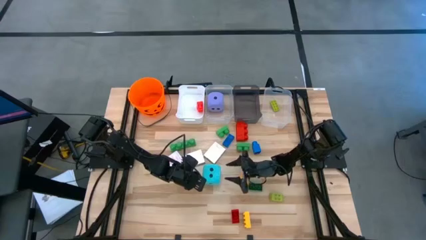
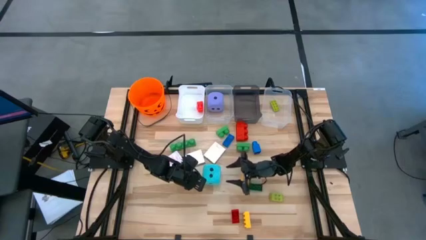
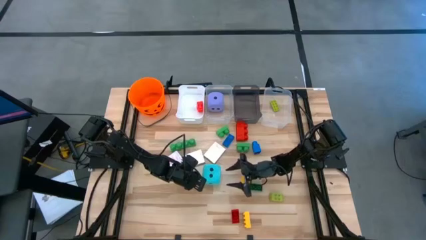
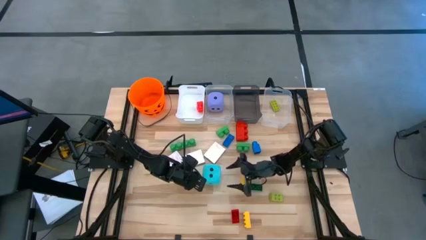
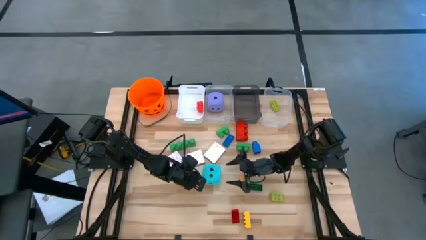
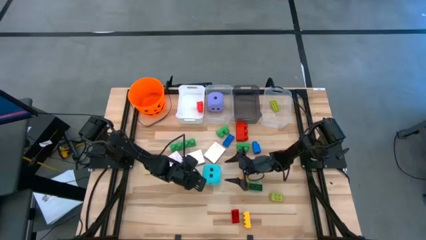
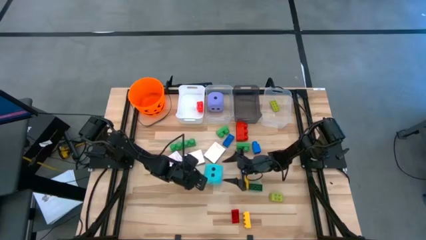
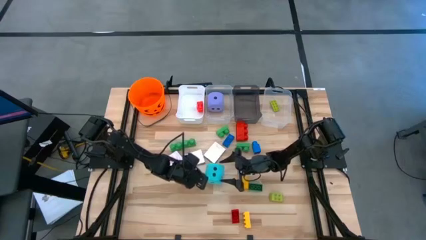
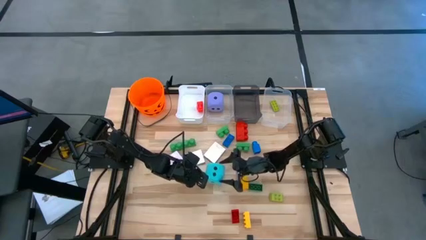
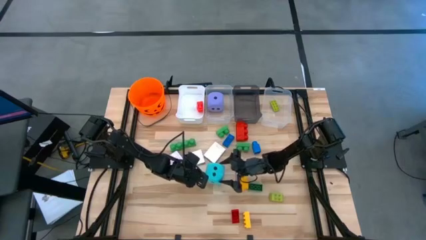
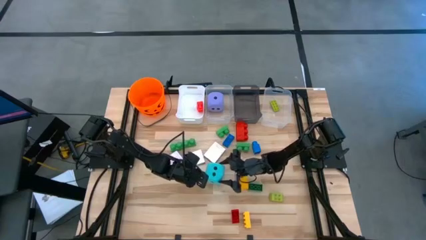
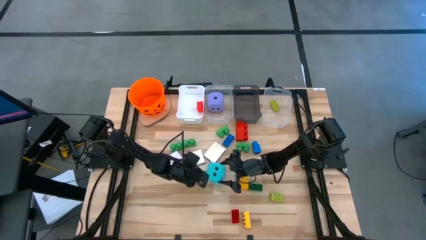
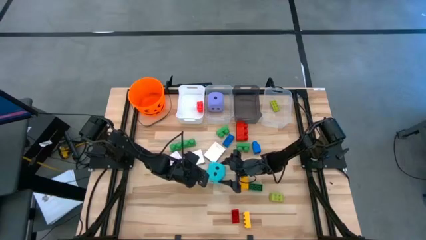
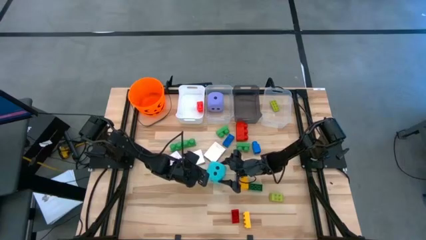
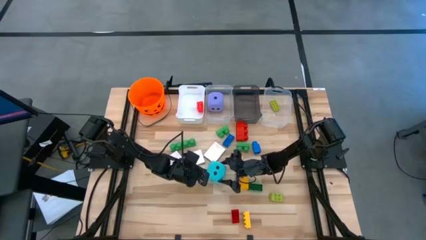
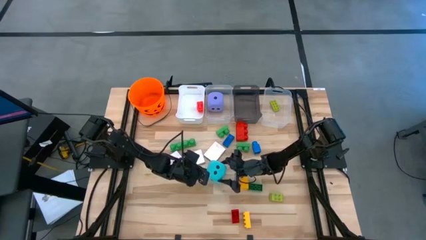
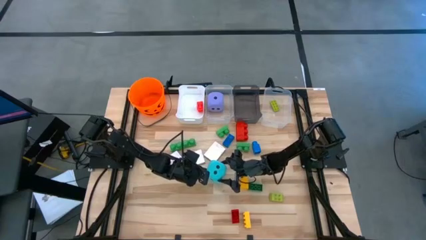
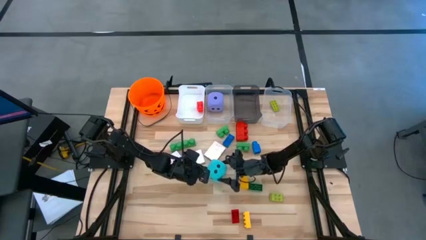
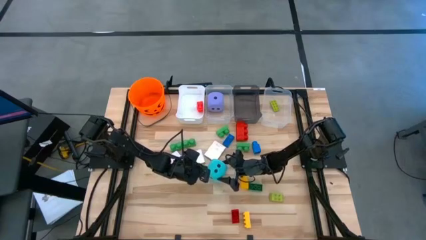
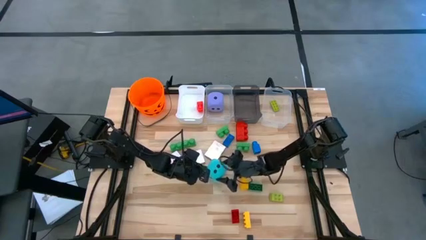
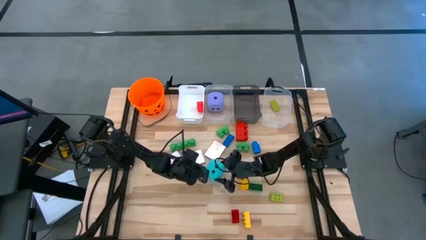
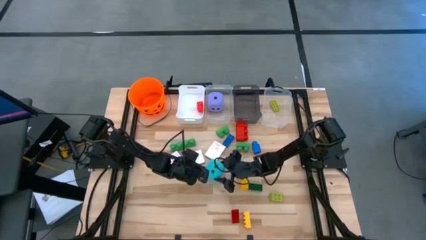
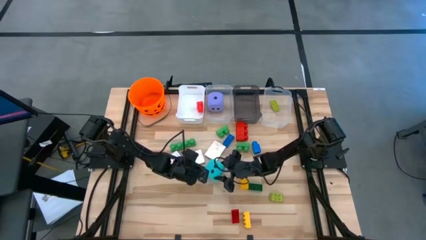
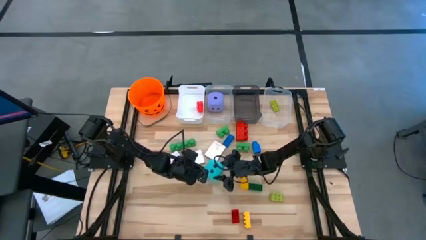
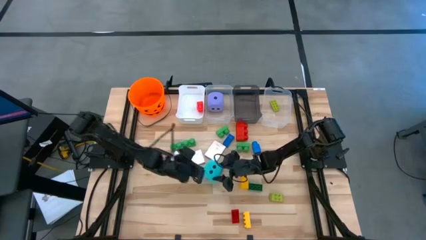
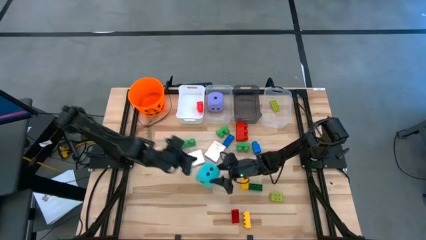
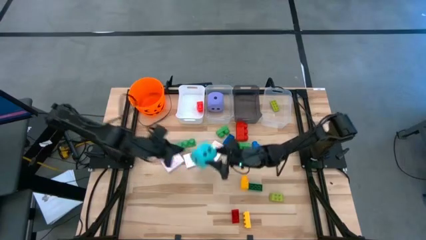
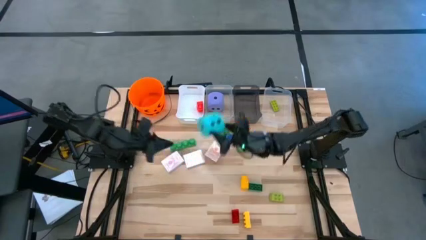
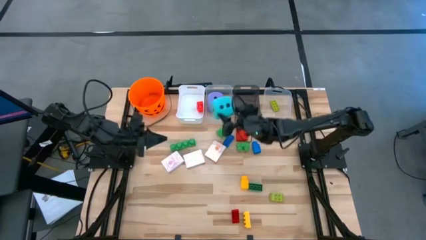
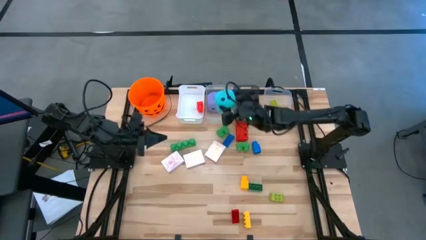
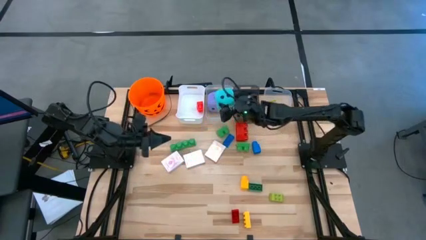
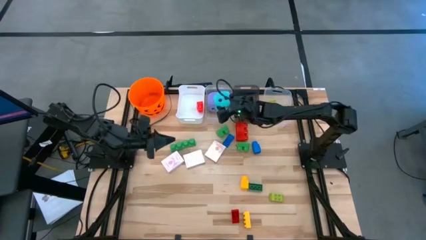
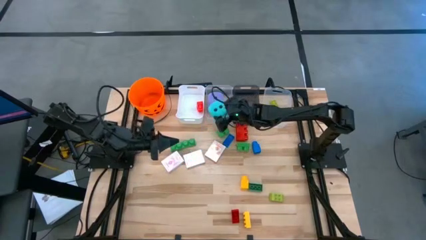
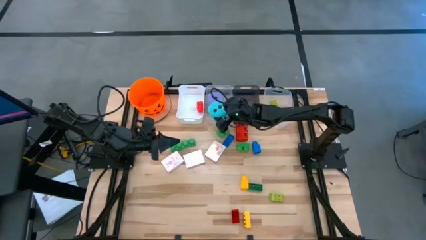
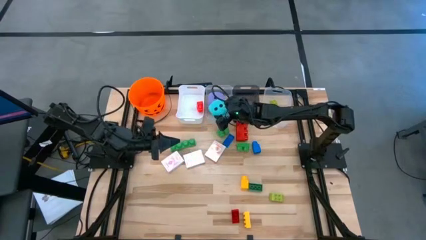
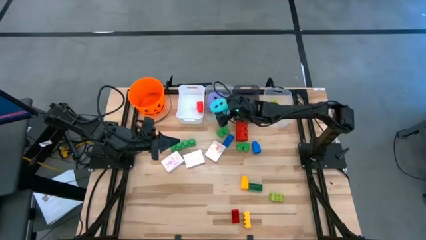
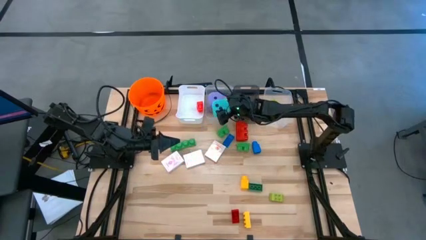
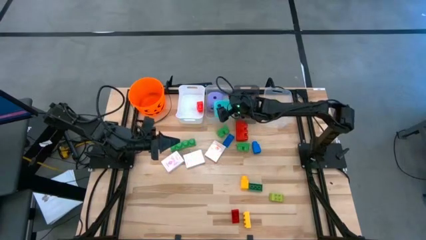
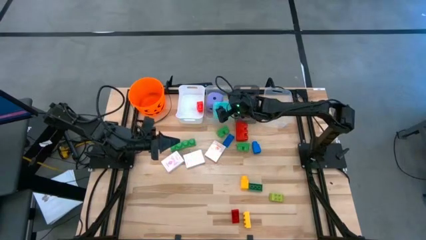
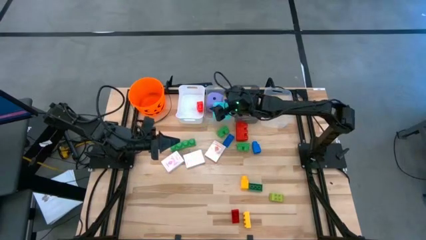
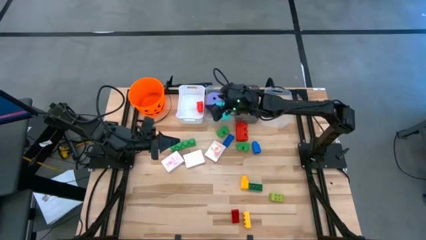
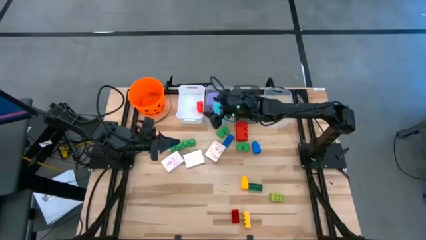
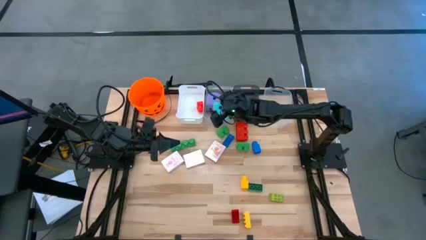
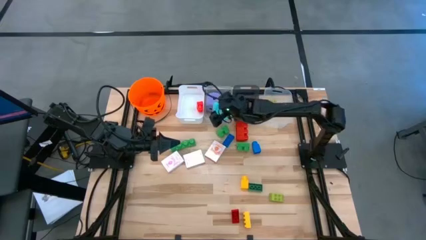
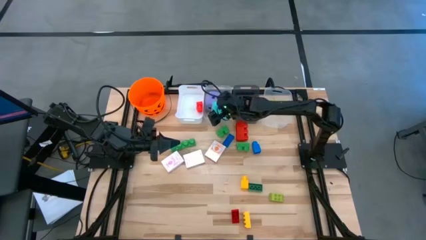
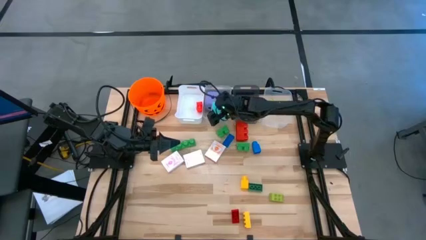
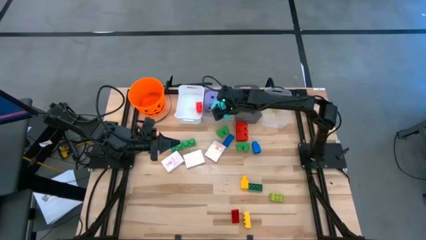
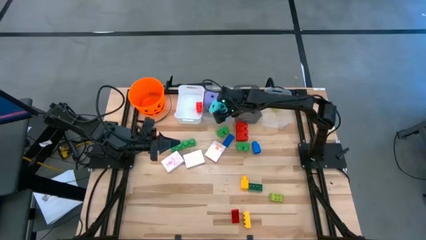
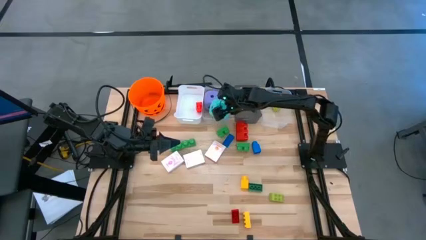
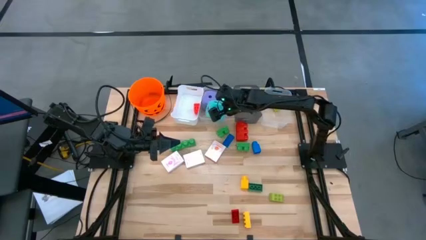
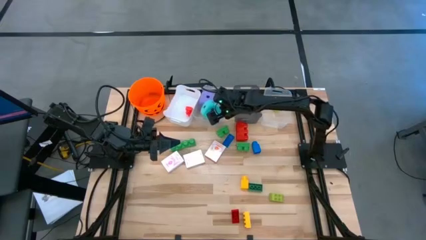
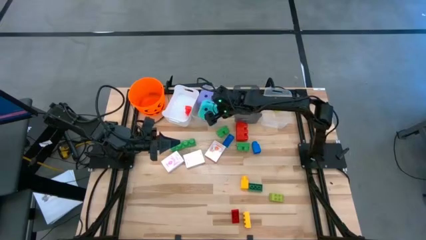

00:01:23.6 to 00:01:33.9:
Task: Pick & Place Toys
Put the blue dice into the left transparent bin

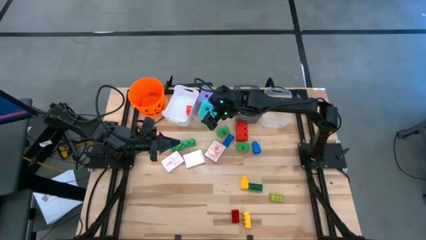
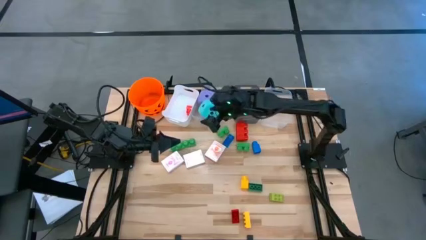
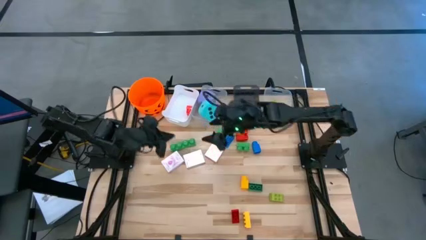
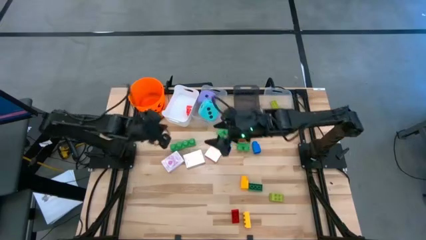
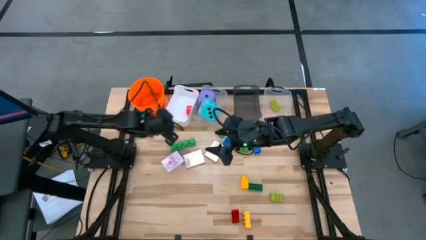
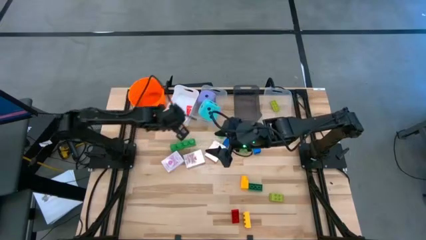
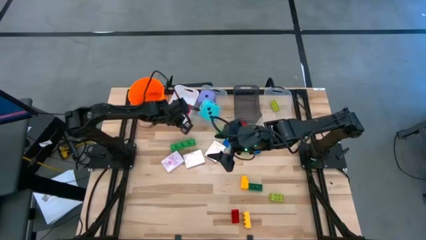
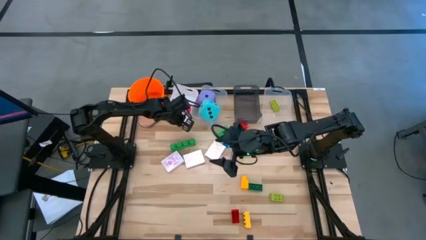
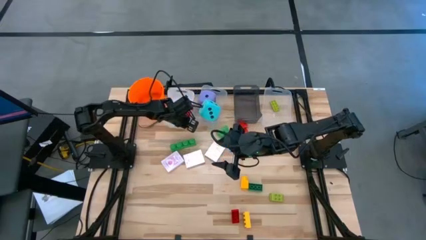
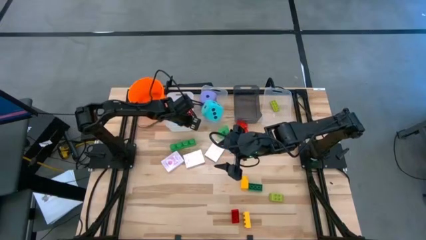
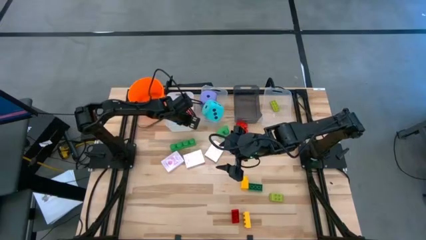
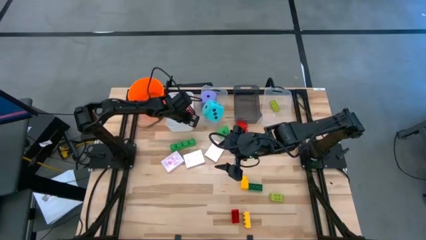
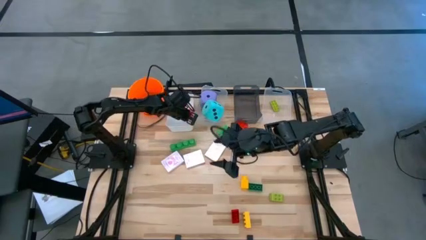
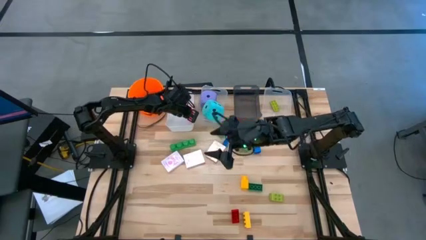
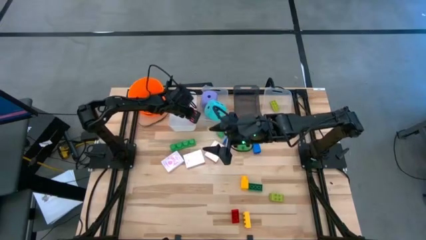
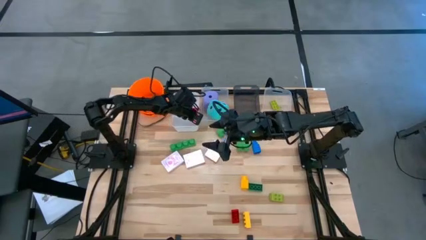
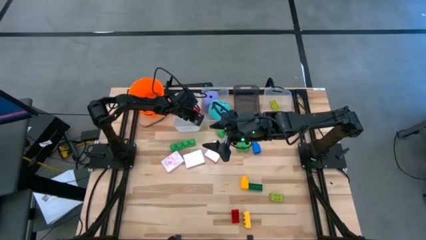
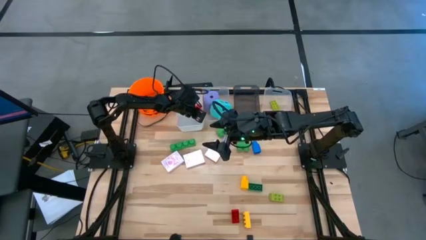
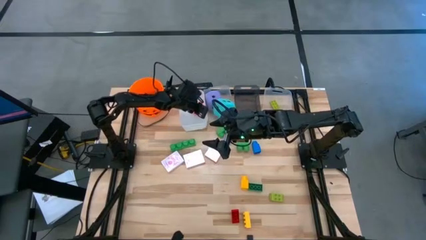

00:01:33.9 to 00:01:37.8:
Adjust the white bin

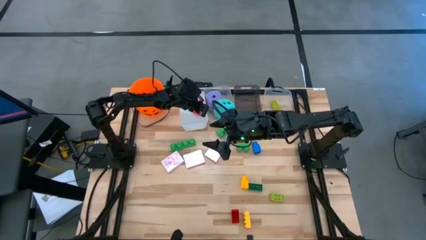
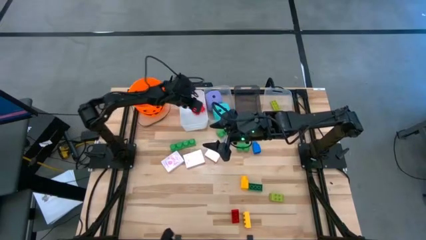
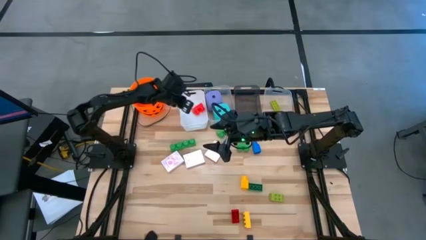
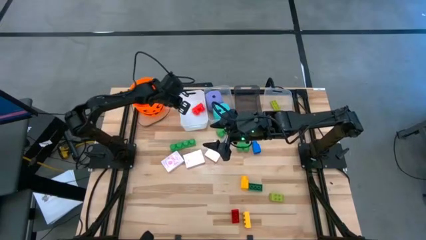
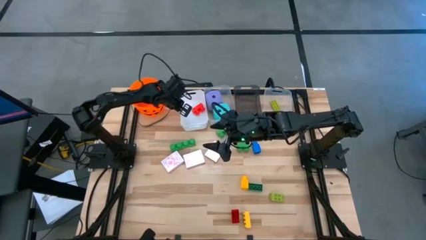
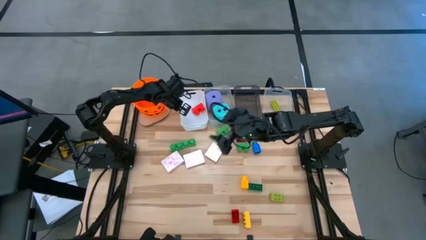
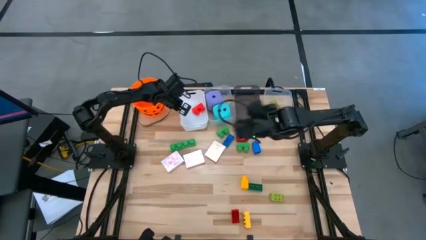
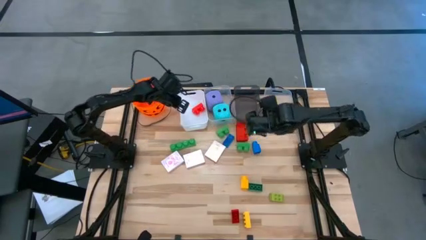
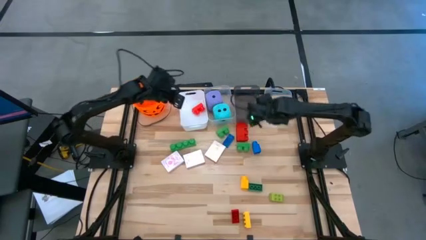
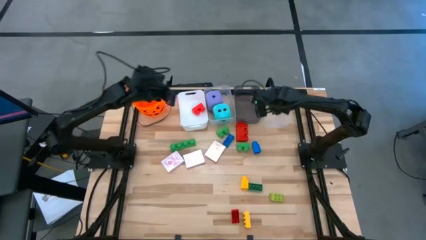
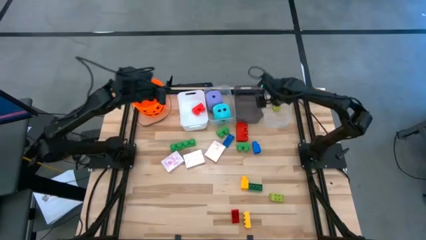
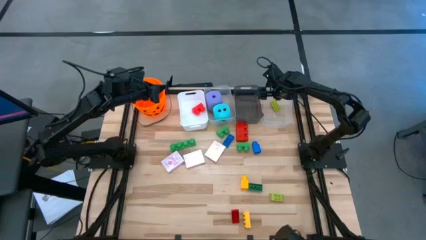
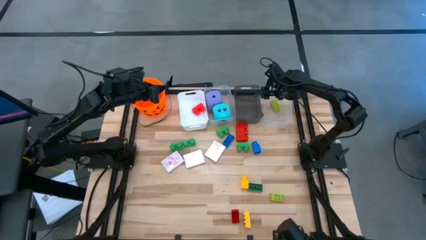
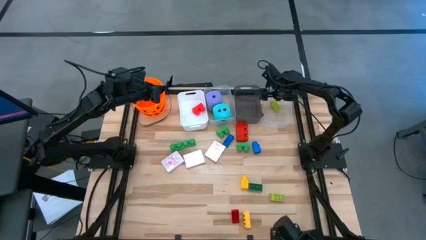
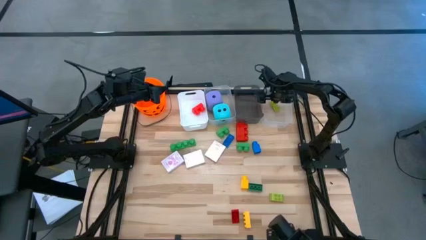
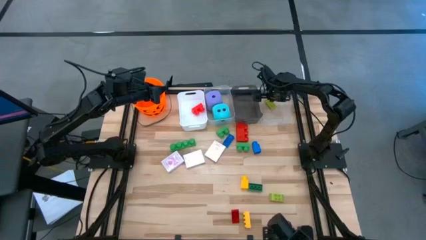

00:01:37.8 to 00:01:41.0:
Adjust the right transparent bin
